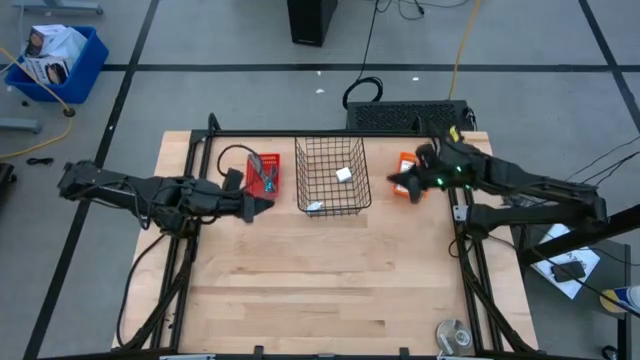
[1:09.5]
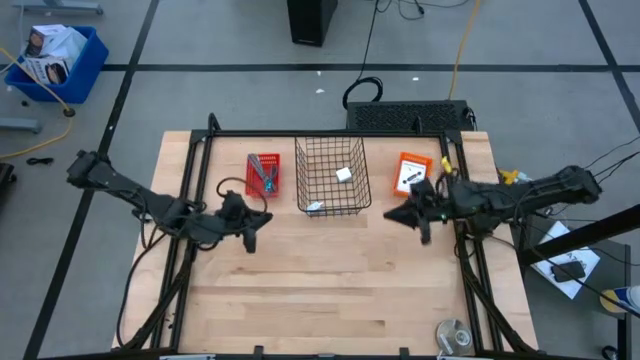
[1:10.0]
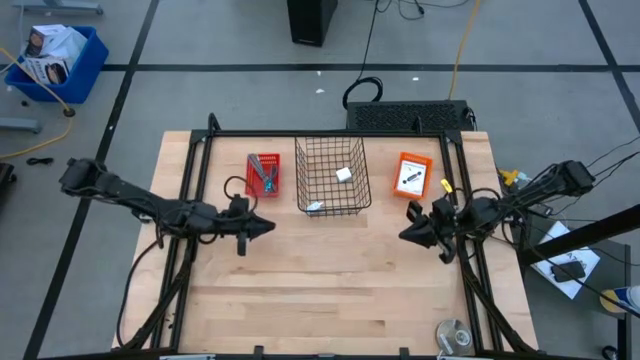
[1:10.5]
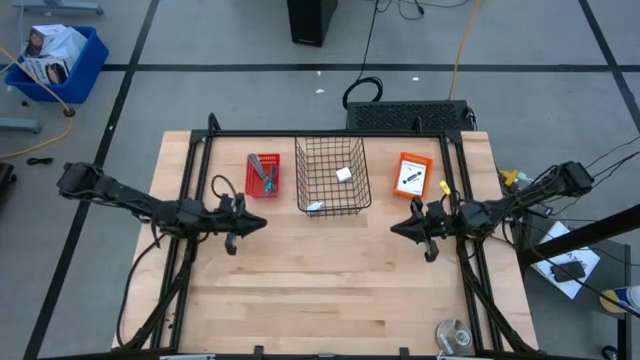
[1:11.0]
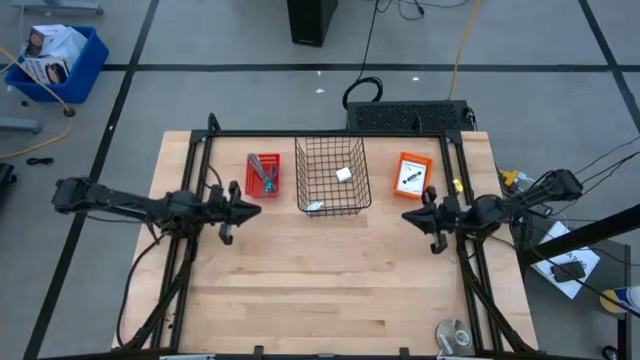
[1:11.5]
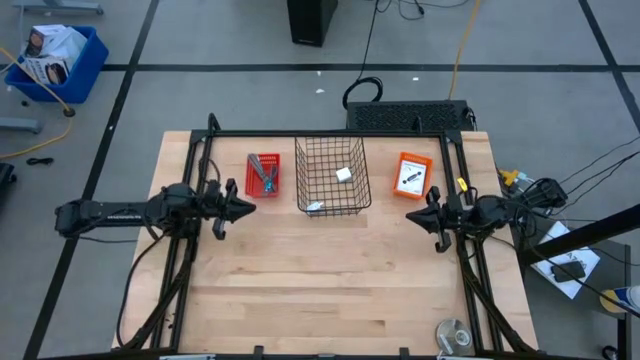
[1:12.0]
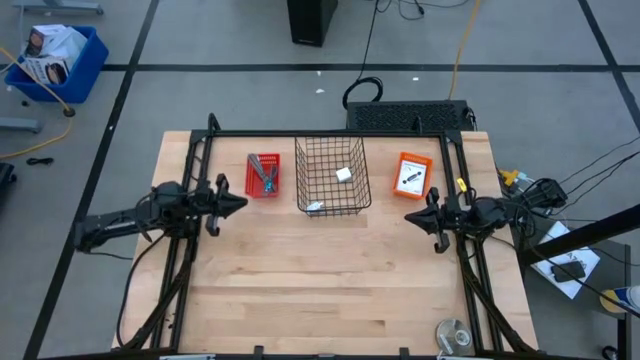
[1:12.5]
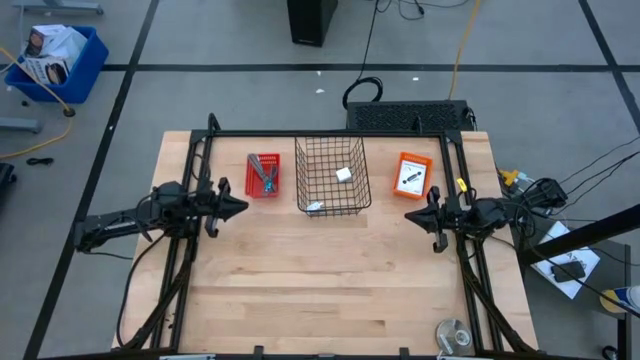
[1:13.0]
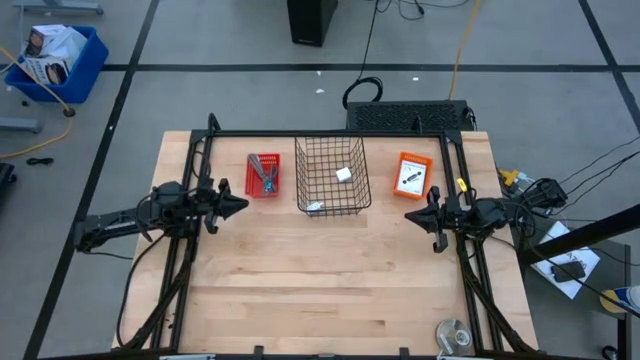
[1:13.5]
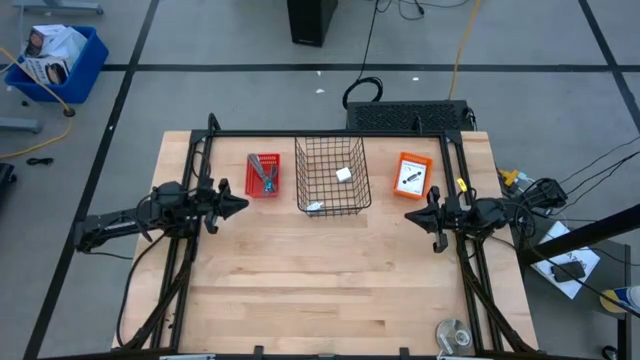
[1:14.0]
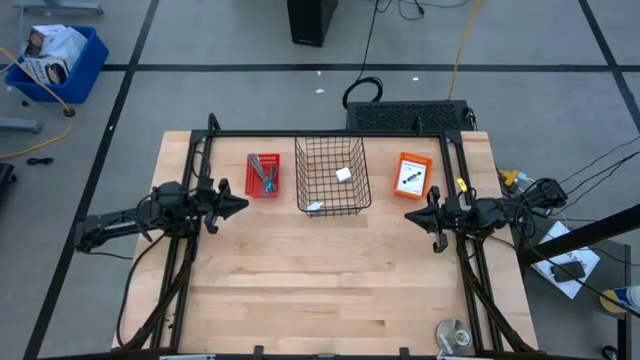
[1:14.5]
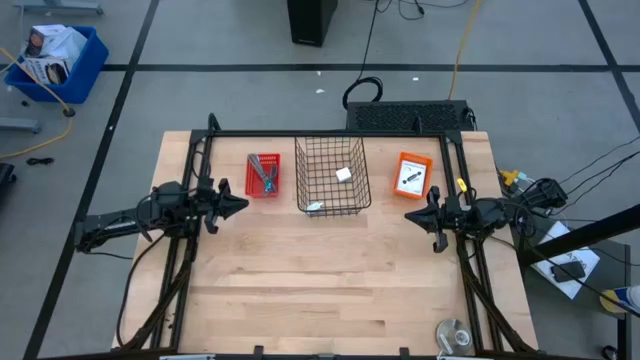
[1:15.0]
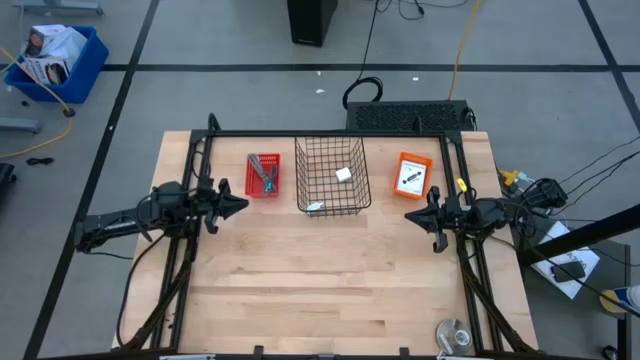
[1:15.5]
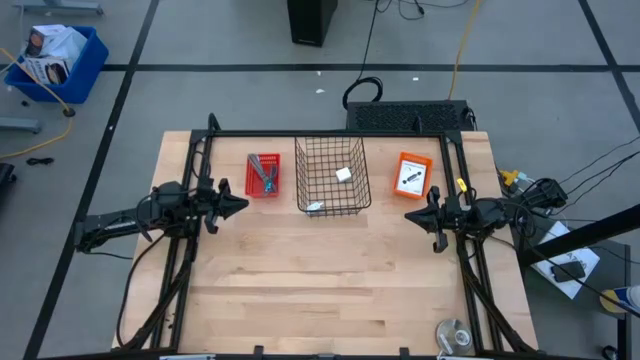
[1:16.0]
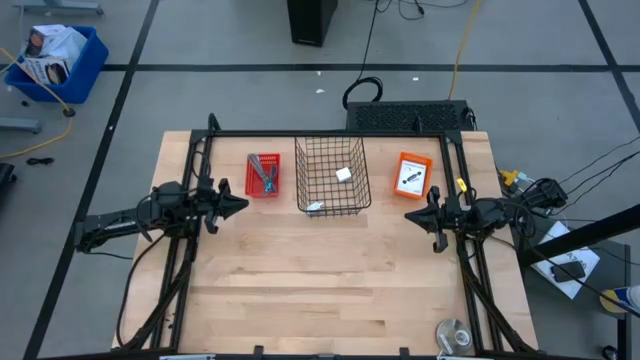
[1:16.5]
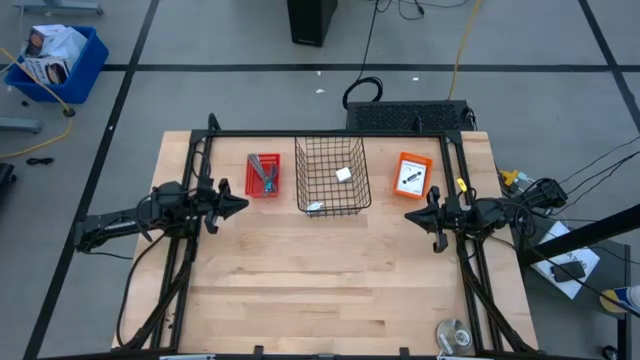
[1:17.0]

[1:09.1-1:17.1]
Task: Pick and place items into bin
Return to Home Position

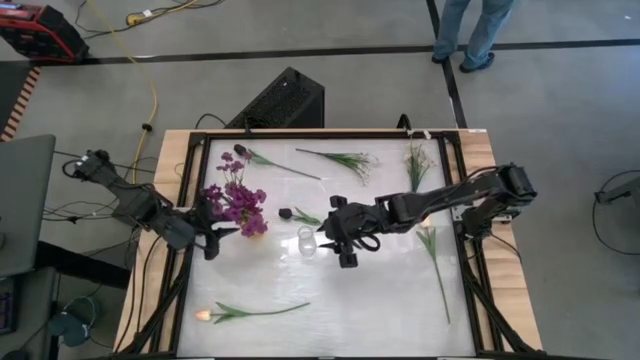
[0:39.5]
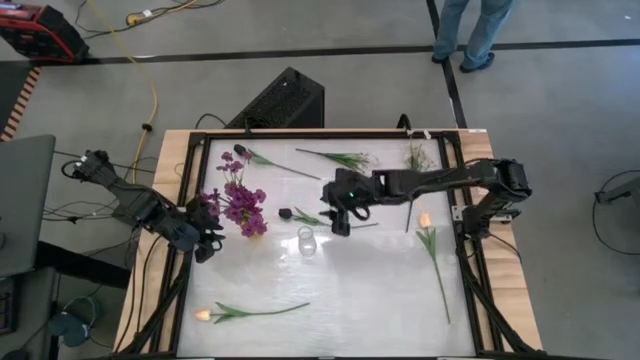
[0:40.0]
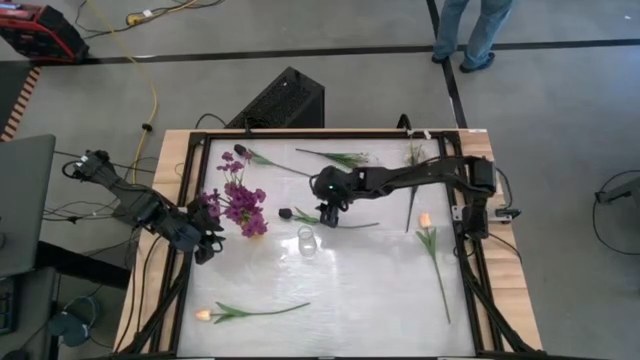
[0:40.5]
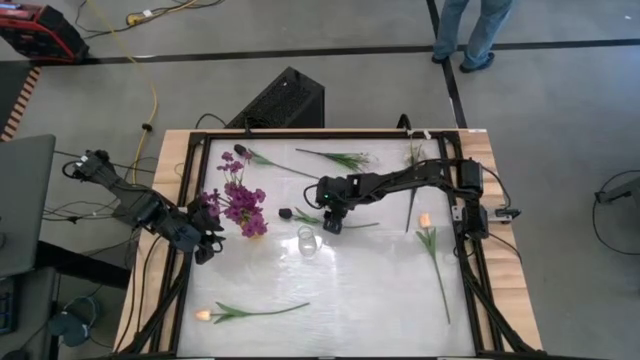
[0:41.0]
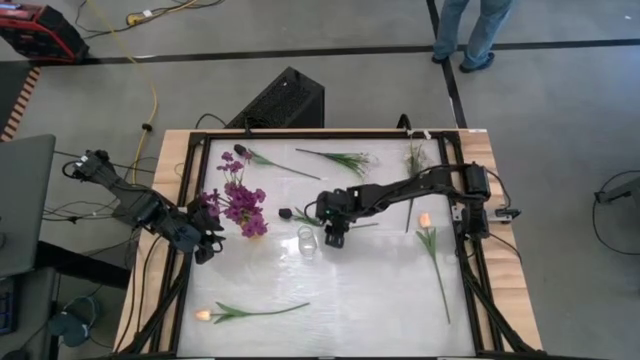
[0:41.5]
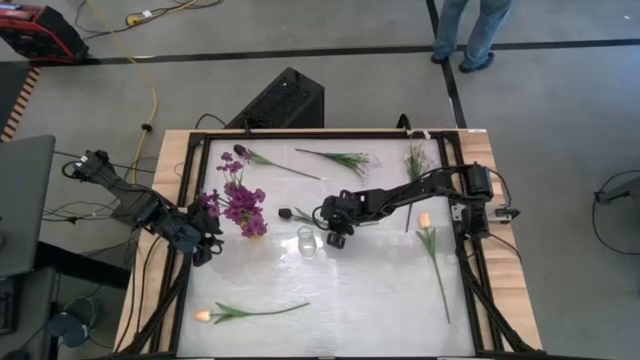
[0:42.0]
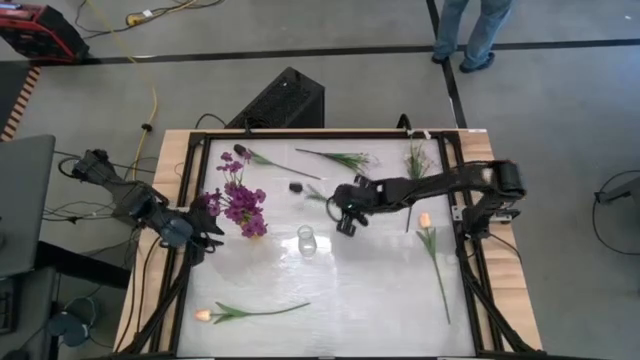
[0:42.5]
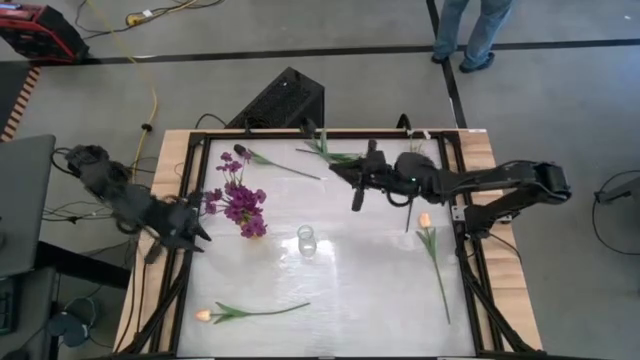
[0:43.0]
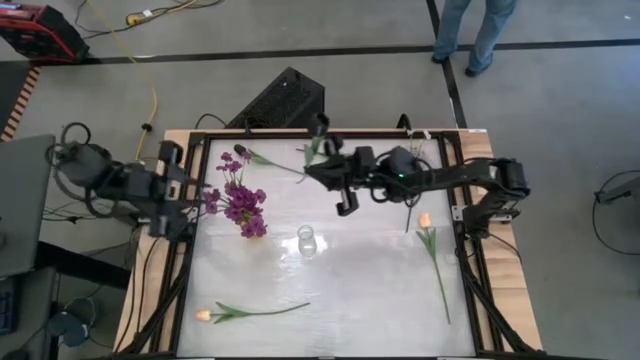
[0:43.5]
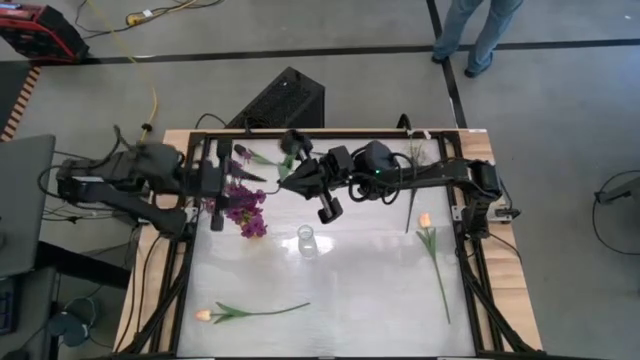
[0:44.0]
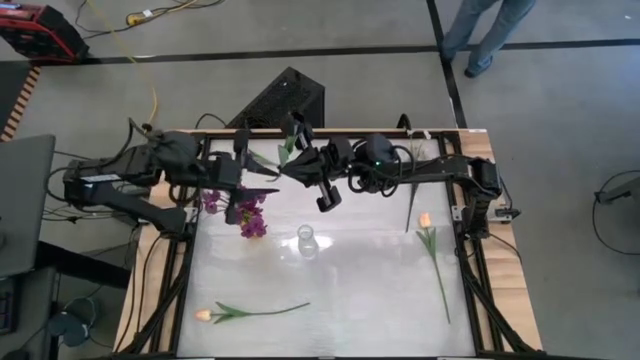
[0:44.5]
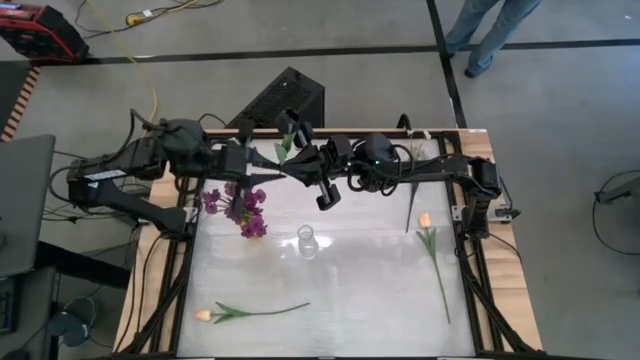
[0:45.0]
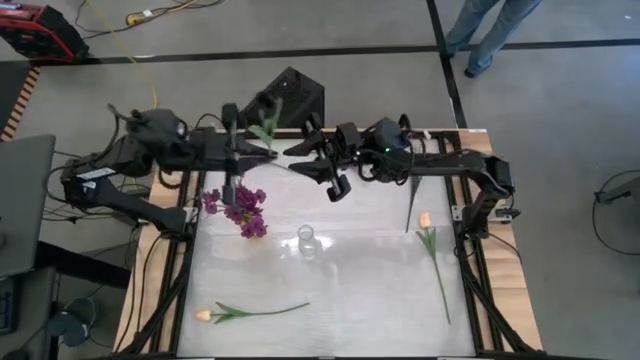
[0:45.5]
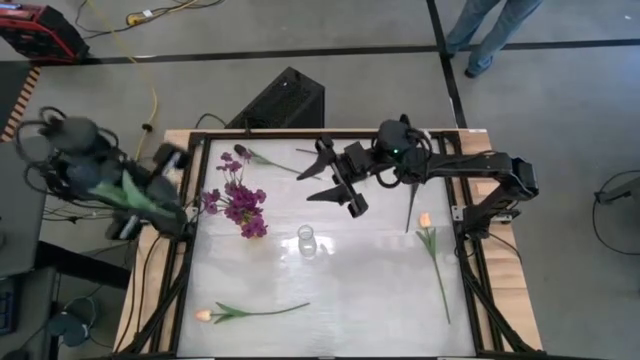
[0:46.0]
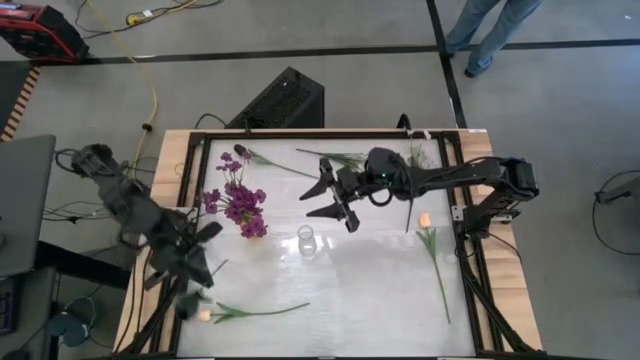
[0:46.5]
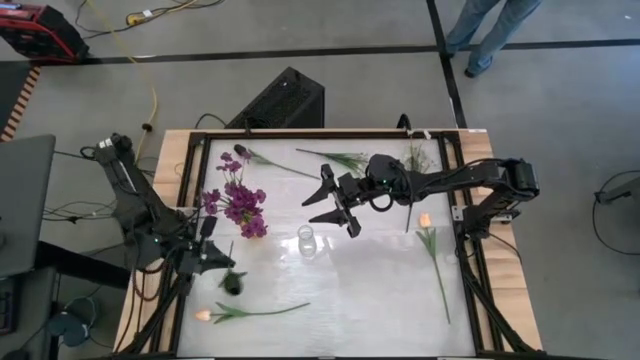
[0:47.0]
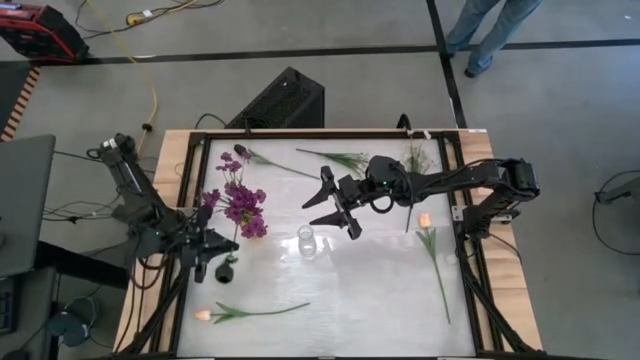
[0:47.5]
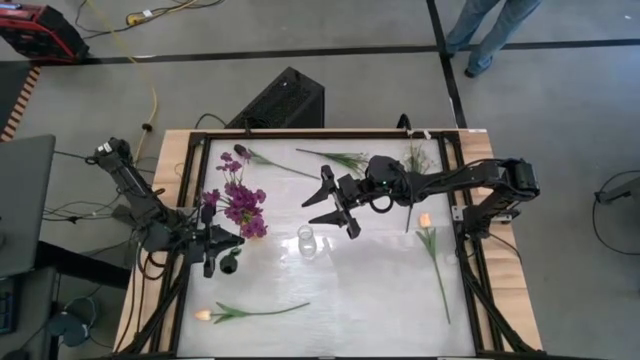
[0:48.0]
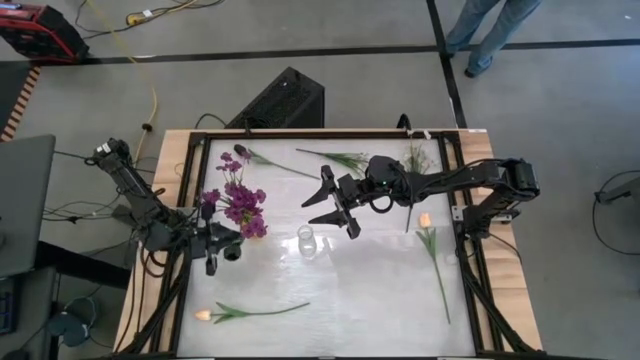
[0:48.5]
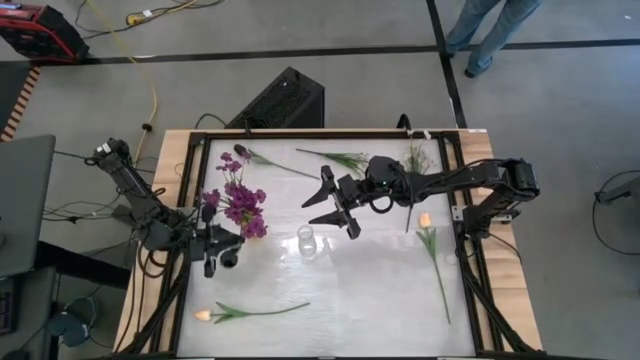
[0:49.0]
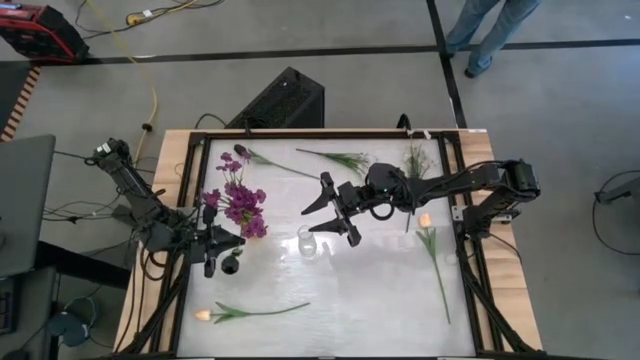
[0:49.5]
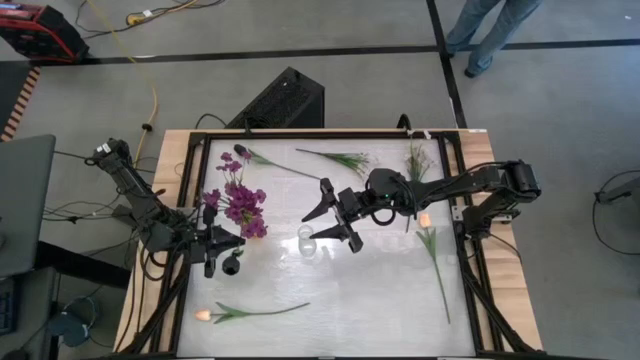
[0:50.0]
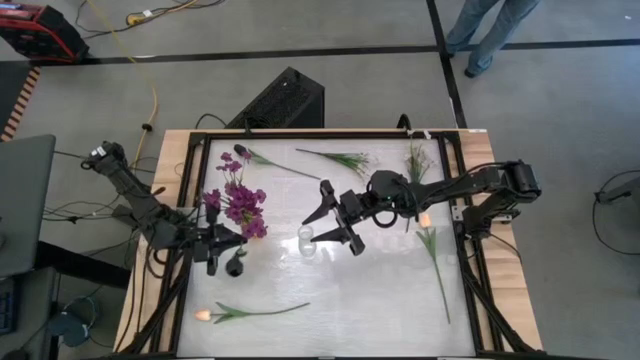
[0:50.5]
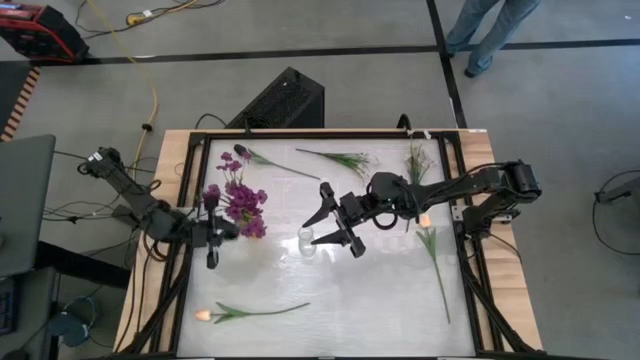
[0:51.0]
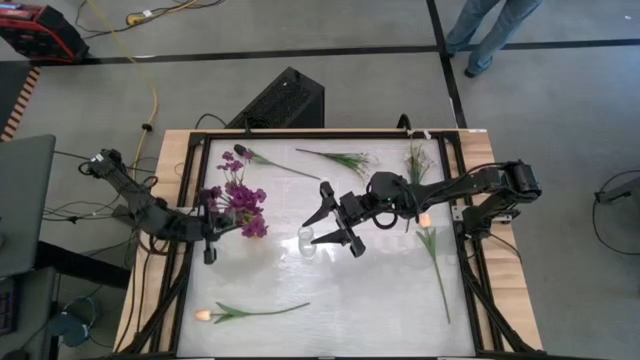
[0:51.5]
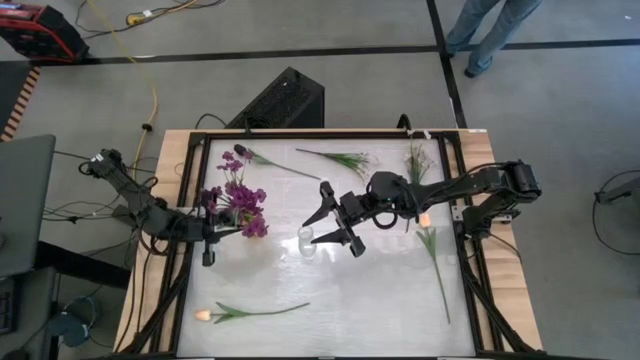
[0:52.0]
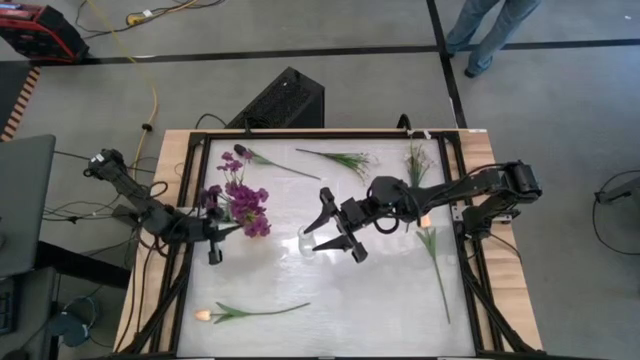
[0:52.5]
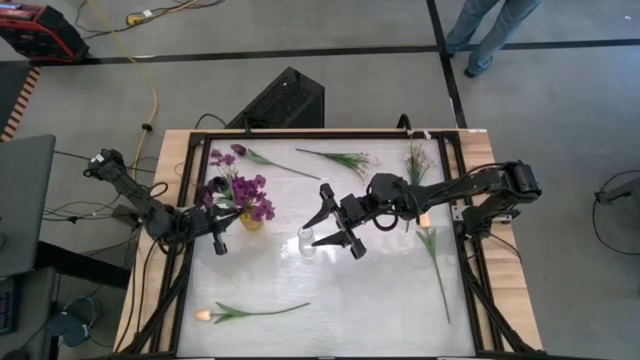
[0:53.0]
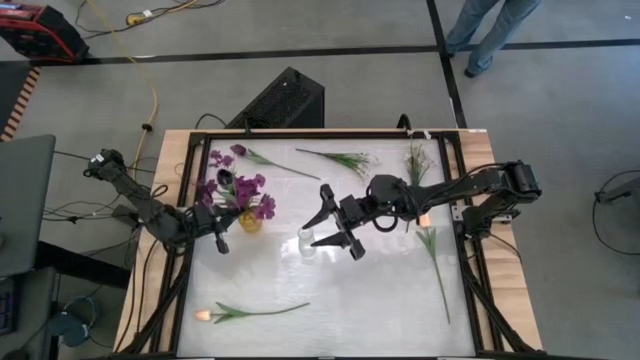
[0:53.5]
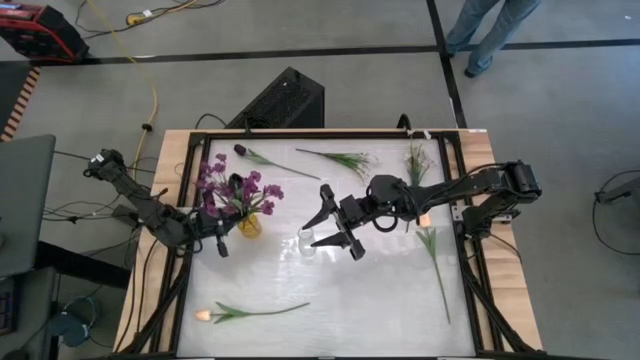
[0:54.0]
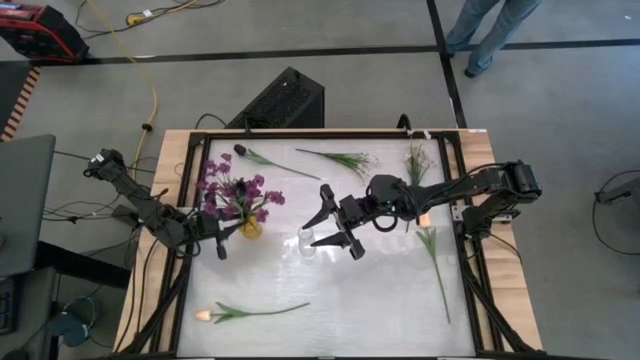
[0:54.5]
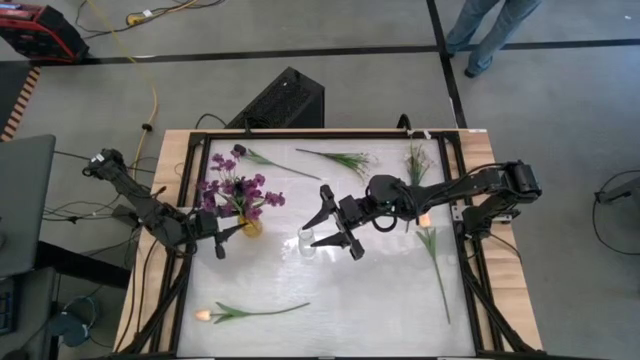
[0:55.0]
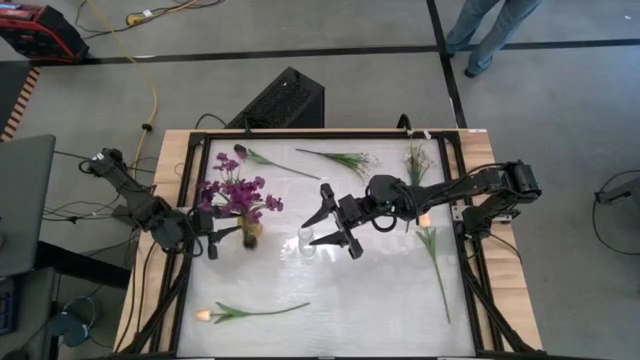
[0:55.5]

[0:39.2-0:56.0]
Task: Sort flowers into vase by color
Put the bottom black tulip into the yellow base
